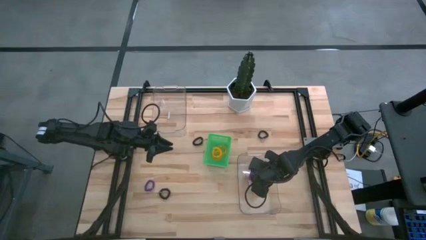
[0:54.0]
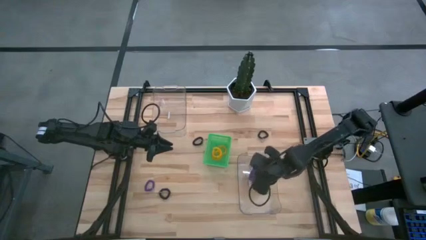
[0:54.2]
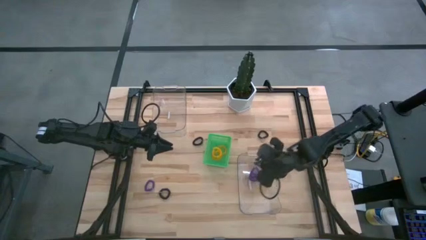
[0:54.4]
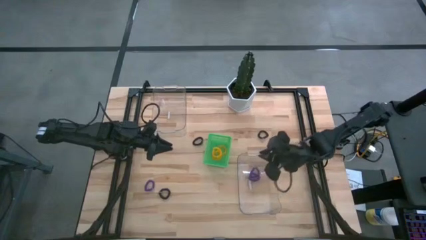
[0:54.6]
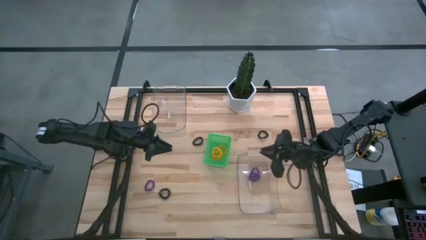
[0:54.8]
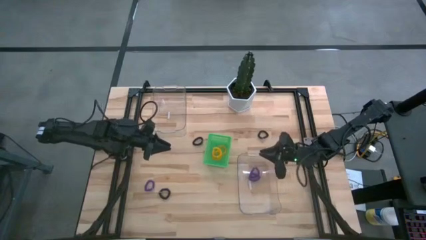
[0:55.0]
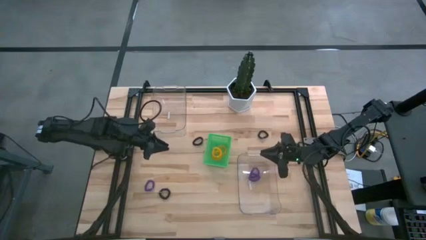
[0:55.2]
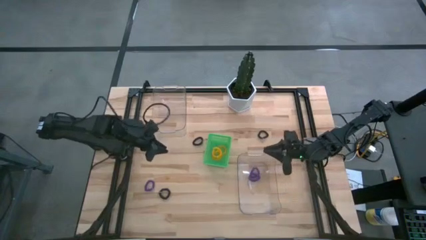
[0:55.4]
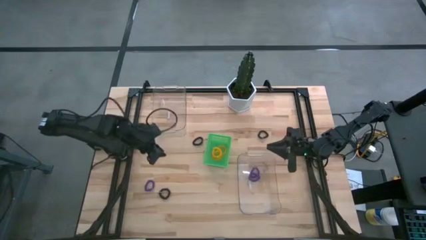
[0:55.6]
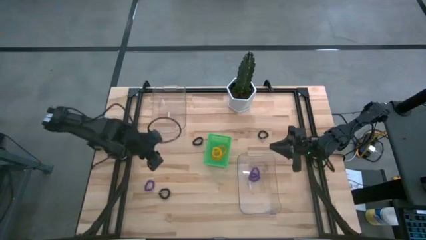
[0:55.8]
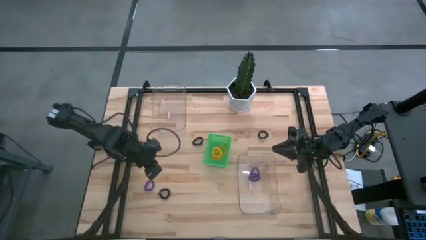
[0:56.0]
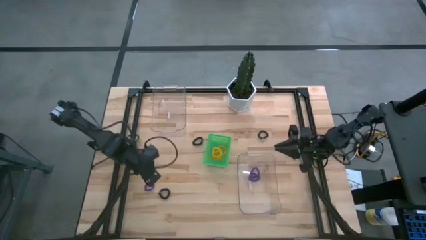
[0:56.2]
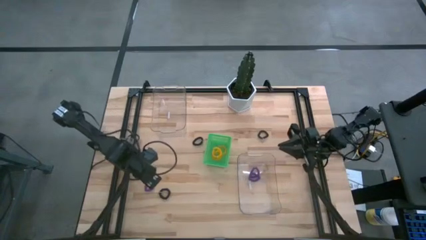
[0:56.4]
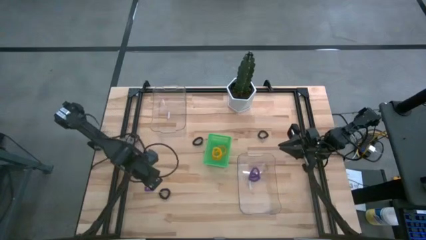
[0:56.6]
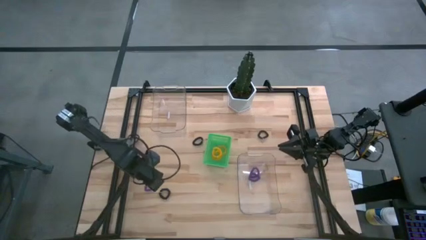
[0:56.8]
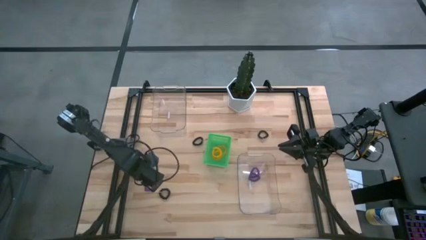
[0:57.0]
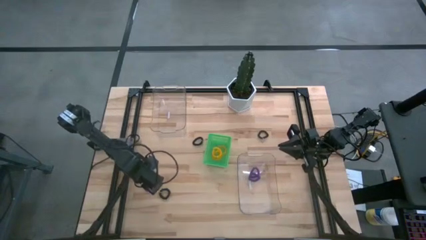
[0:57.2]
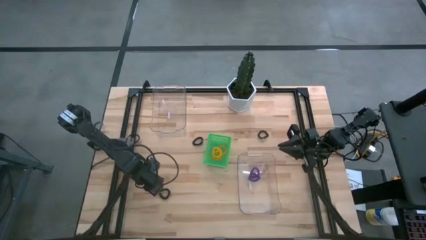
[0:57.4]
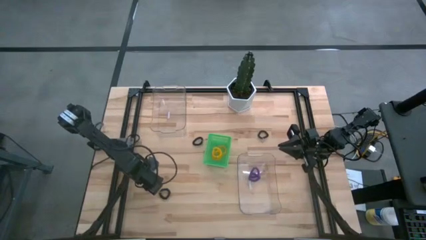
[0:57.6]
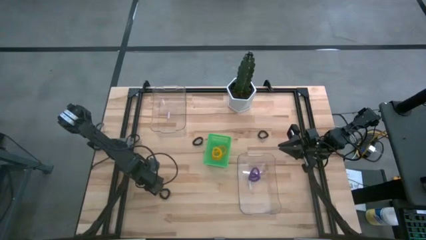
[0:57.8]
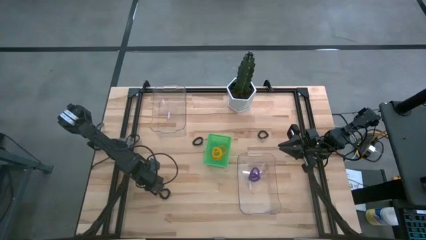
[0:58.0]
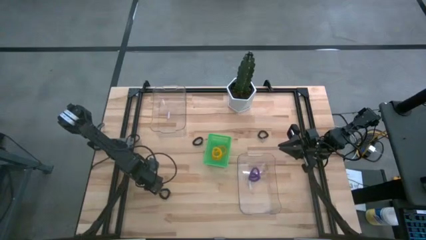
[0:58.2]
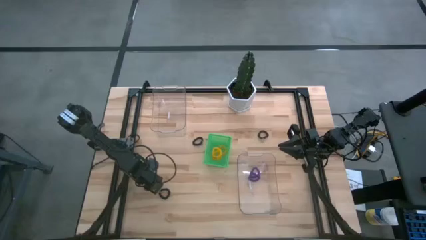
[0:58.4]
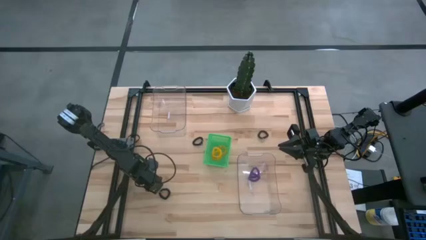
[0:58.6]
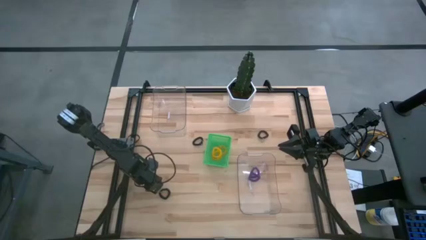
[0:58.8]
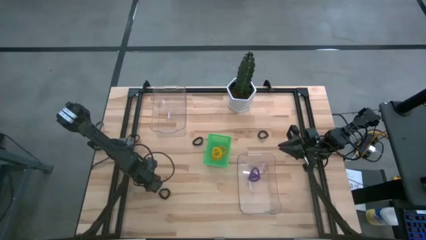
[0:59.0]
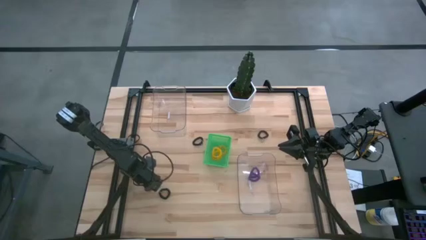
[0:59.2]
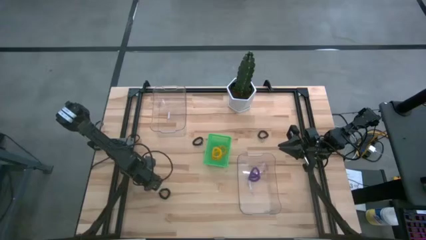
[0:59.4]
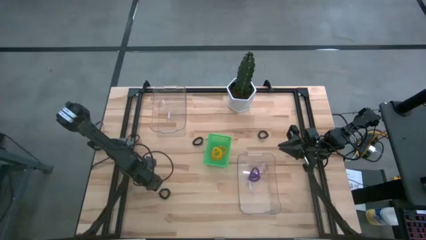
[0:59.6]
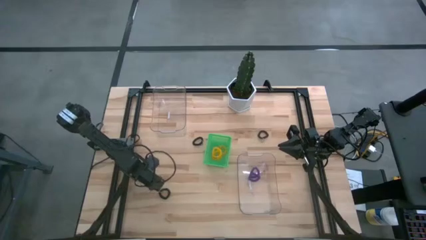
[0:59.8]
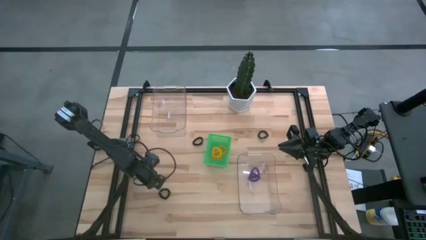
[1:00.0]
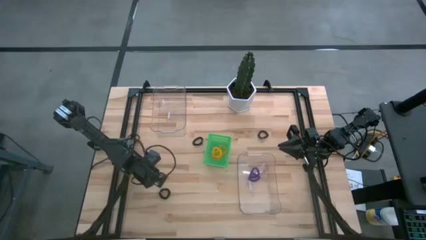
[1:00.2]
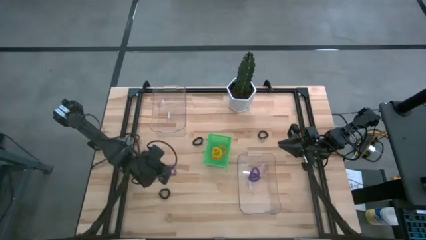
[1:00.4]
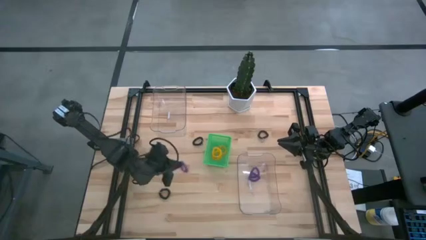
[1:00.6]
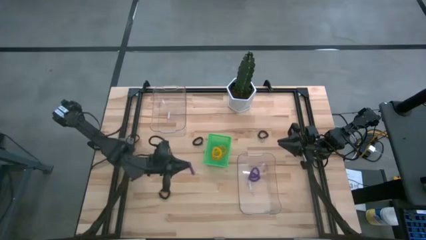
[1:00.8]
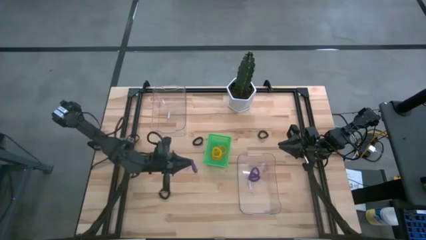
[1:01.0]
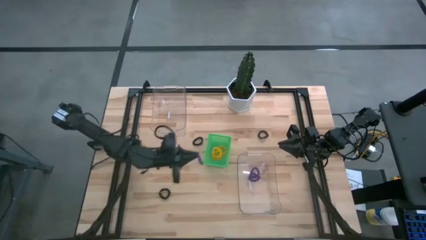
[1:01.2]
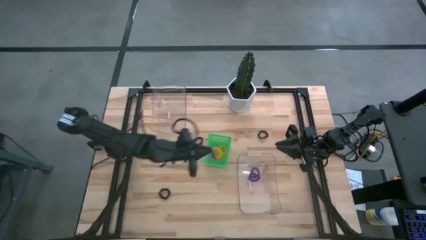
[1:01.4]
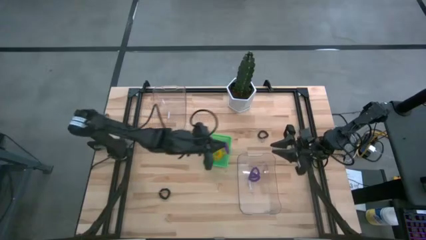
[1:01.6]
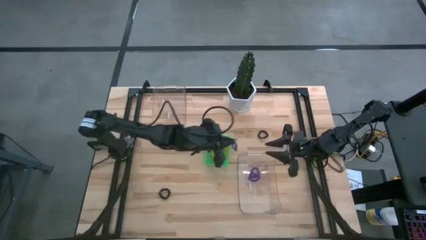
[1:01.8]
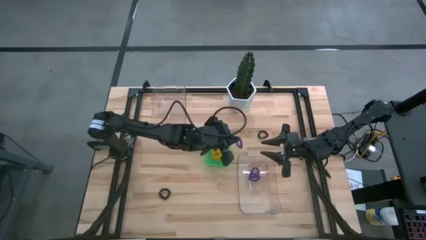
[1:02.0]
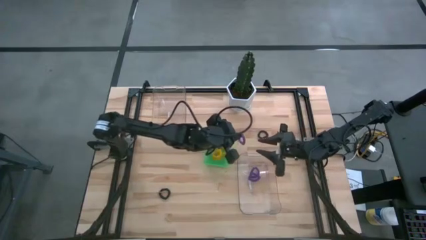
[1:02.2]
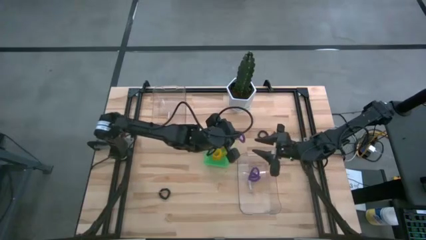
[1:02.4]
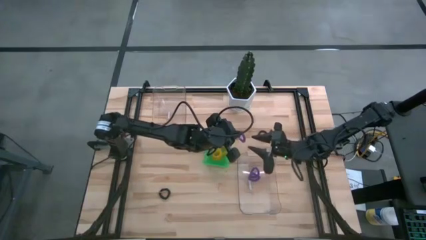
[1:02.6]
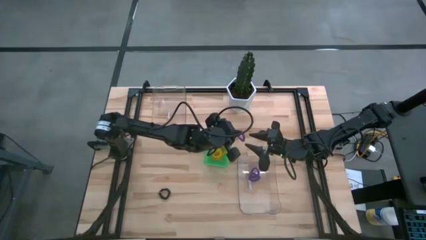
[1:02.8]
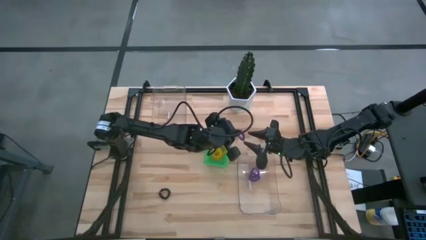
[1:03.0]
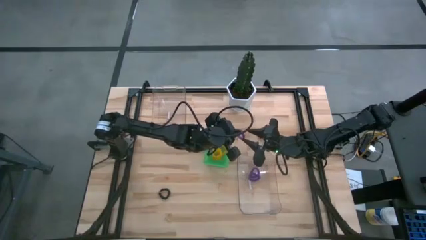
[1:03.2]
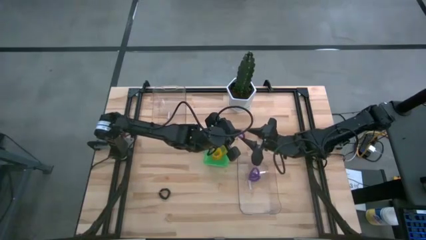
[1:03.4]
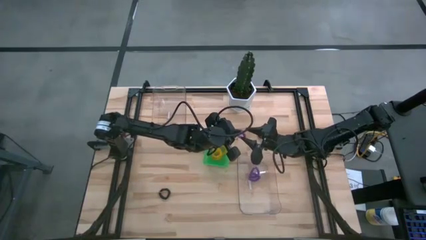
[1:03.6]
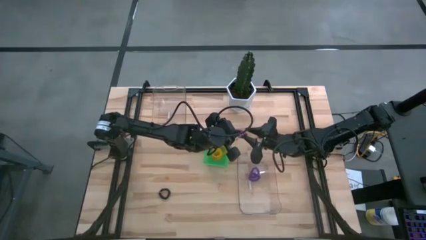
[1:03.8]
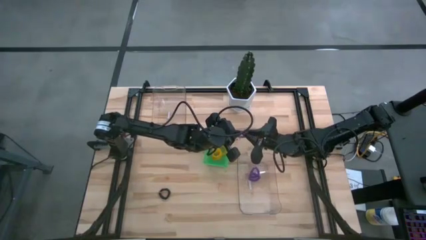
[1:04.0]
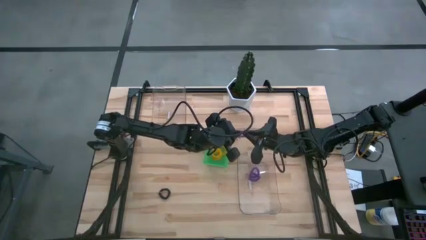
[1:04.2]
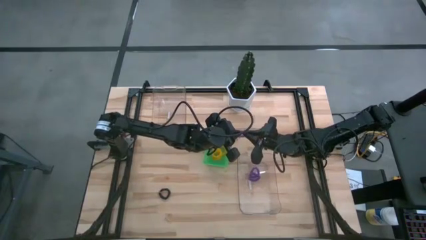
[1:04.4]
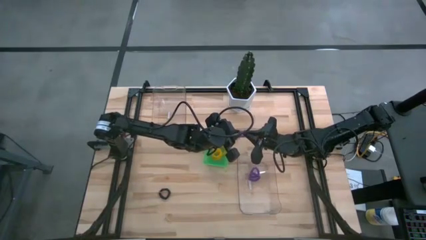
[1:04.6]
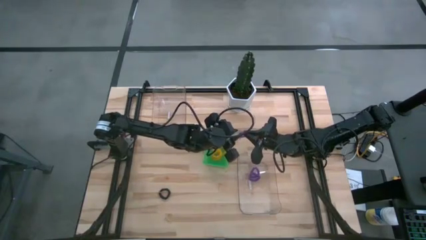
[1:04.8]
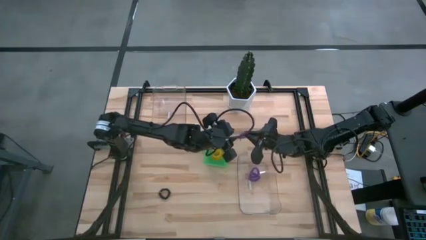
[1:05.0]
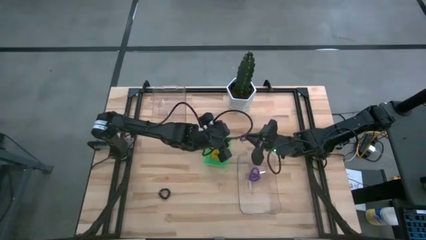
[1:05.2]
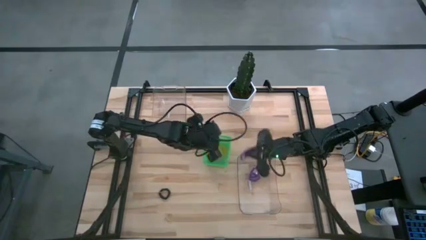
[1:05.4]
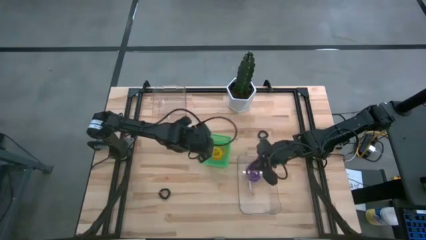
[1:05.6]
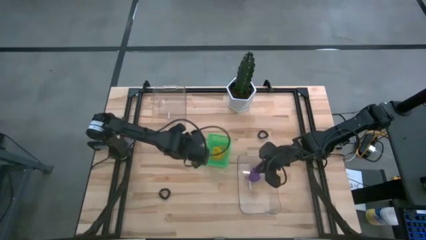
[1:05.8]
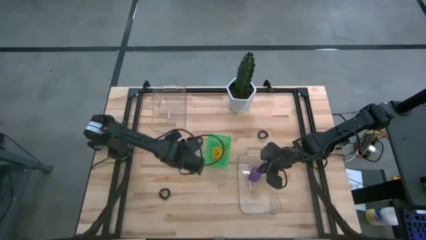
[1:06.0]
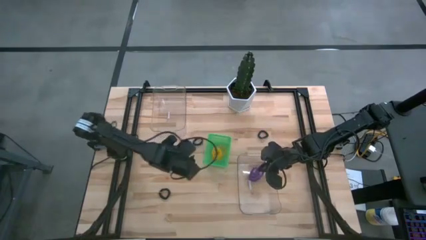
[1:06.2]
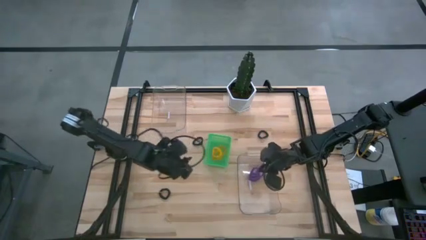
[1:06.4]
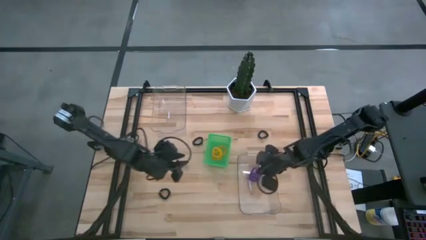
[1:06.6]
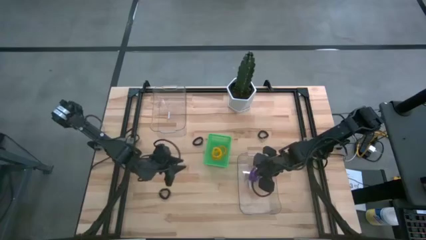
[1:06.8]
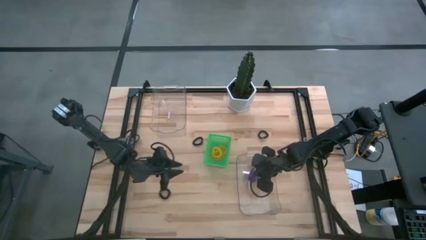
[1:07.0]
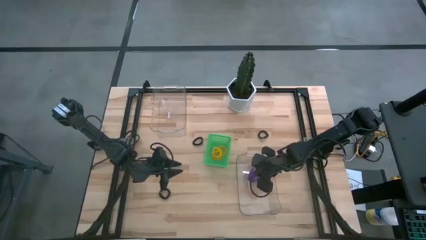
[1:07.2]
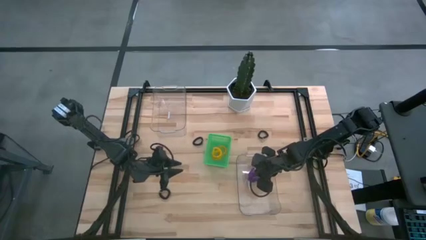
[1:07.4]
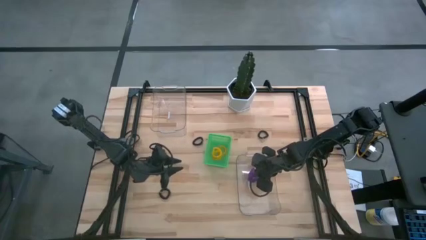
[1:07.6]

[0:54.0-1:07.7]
Task: Sort spring keychains
Put the purple spring keychain into the right transparent bin
